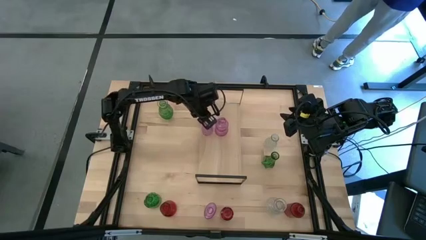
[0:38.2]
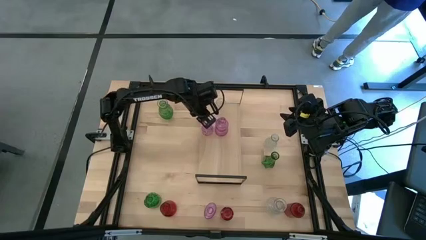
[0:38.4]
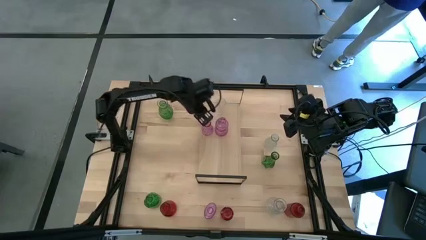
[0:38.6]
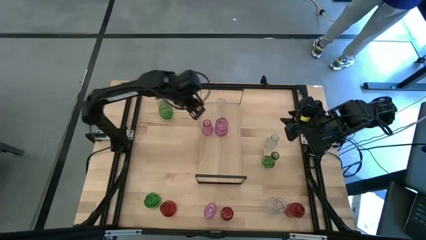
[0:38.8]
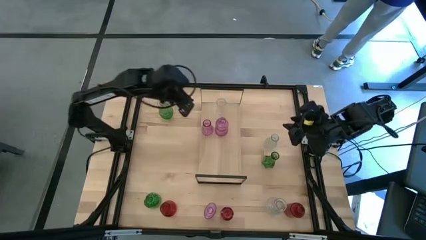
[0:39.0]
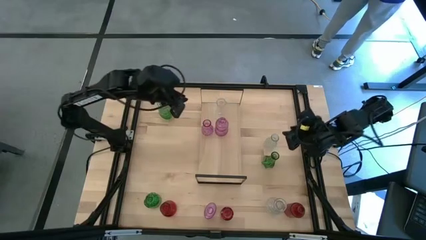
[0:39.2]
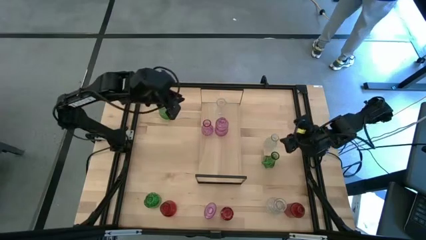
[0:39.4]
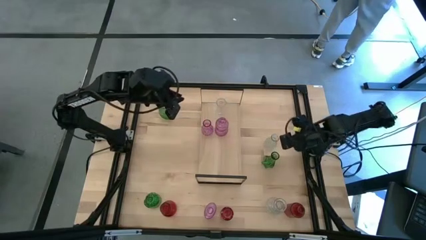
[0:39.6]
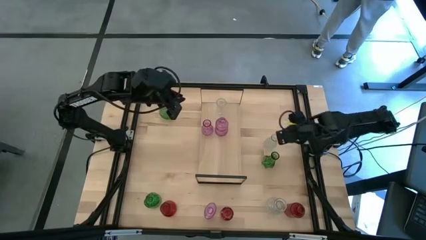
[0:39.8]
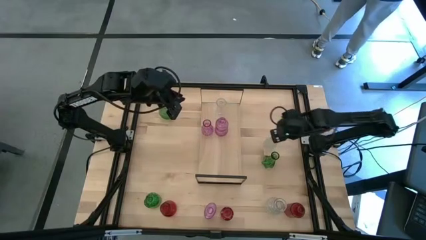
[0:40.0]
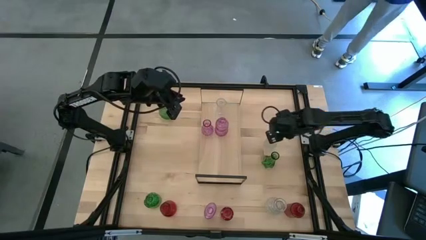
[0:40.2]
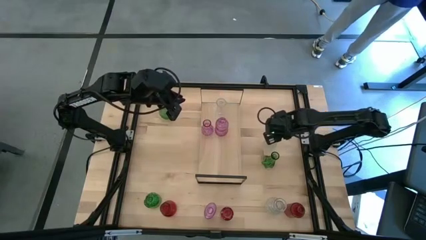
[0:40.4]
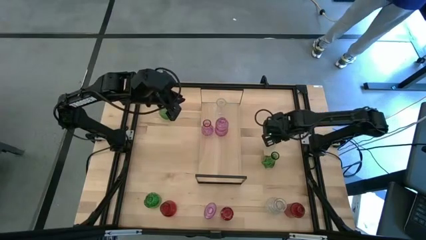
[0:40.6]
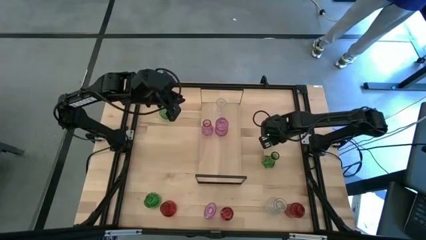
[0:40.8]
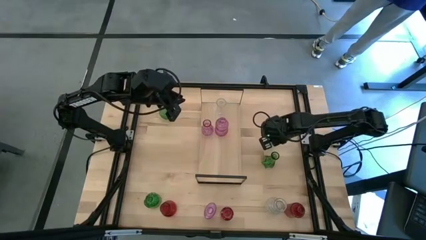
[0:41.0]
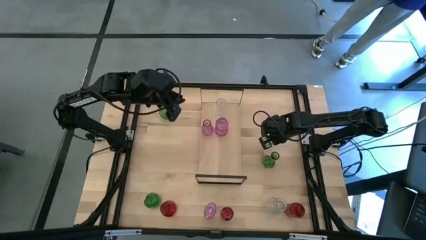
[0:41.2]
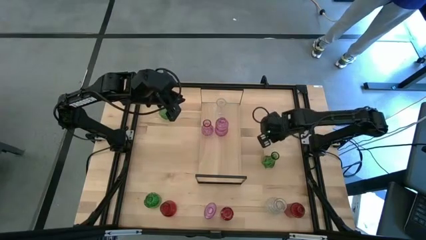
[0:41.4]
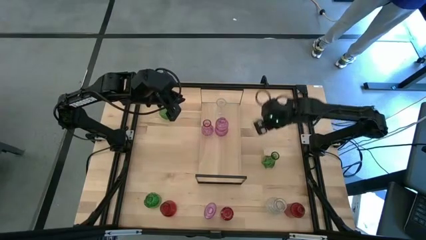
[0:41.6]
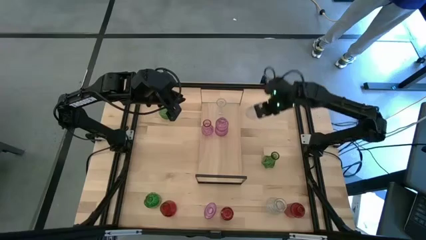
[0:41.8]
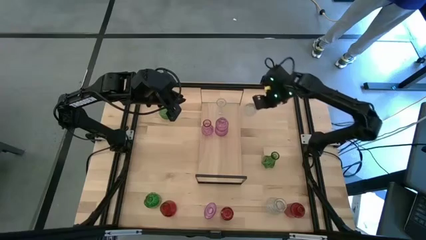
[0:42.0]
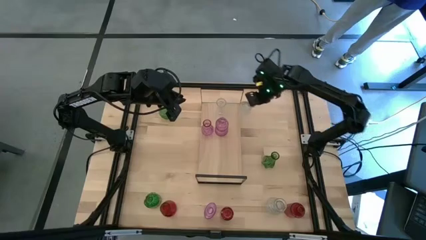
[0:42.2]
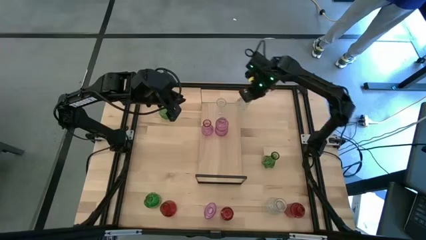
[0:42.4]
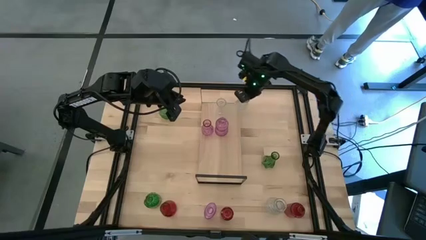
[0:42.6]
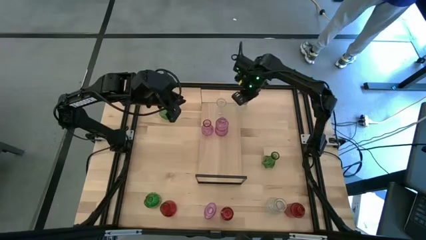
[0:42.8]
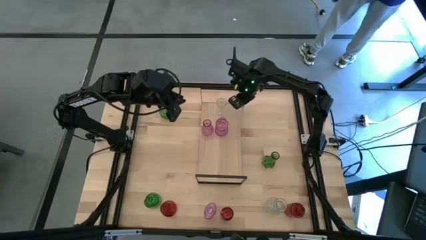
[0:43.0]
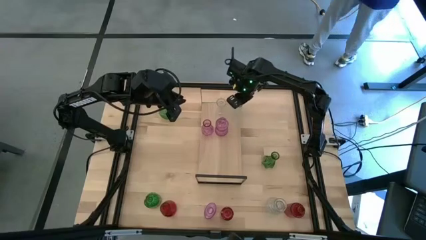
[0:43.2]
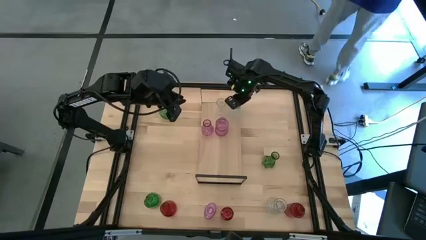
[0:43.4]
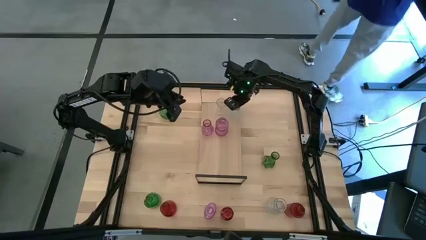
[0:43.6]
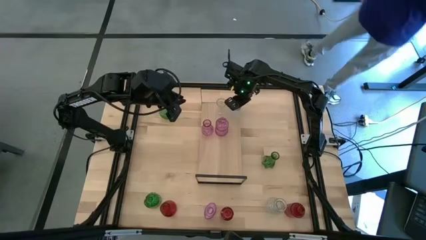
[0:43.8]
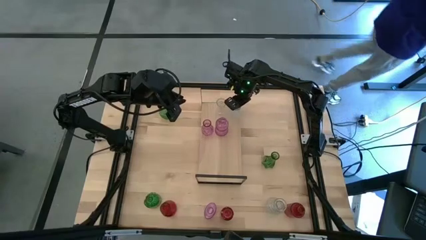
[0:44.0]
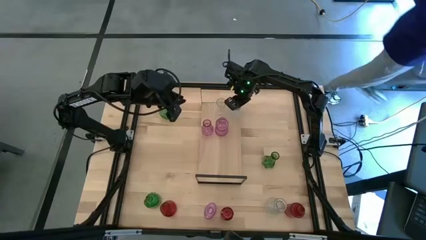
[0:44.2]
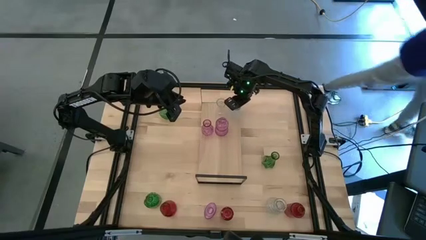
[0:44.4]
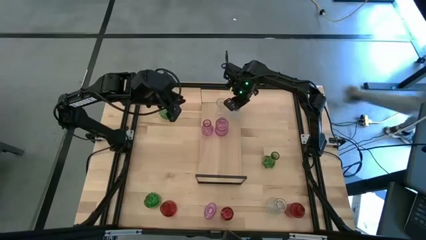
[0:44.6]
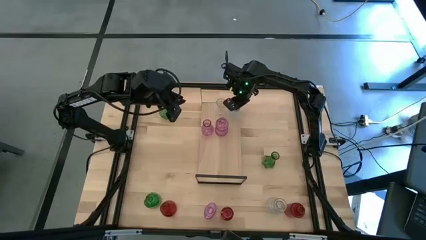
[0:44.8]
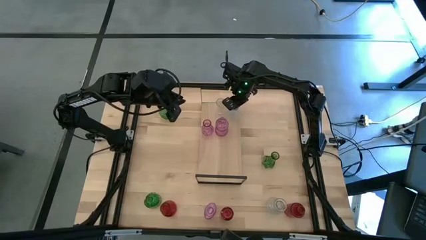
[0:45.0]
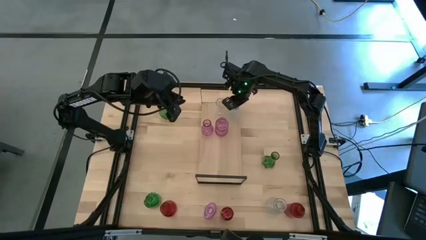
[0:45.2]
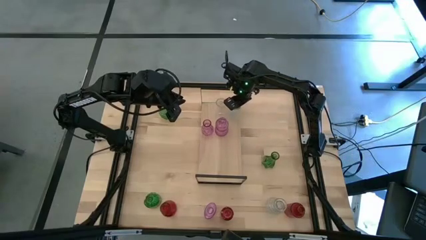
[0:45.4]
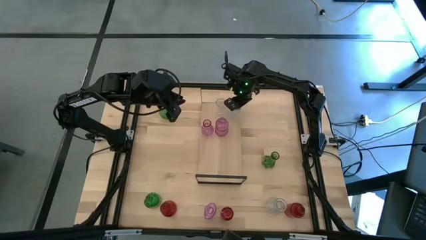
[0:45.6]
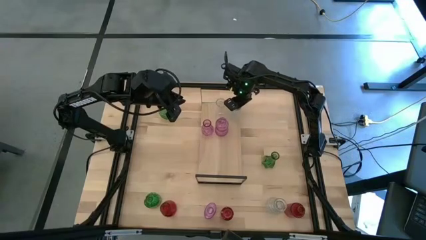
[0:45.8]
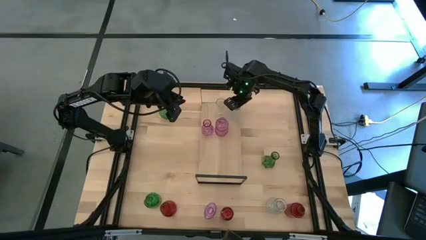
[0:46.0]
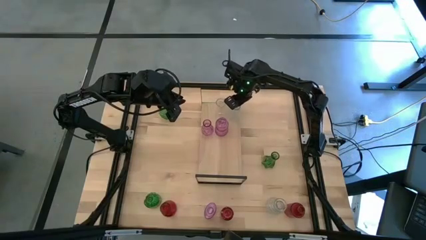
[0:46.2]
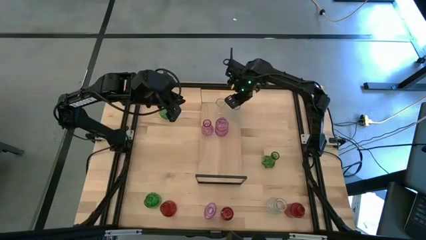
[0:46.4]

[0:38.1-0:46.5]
Task: sort vases onto shelf
Put the top transparent vase on the shelf aligned with the other transparent vase

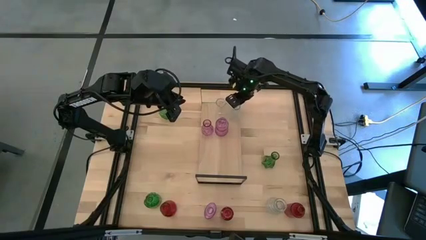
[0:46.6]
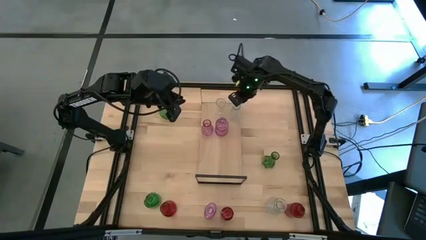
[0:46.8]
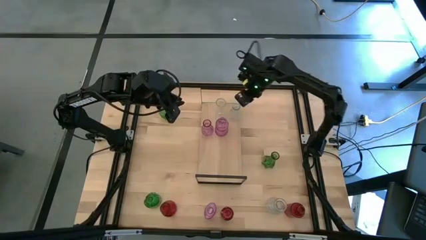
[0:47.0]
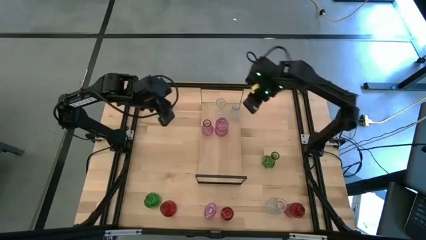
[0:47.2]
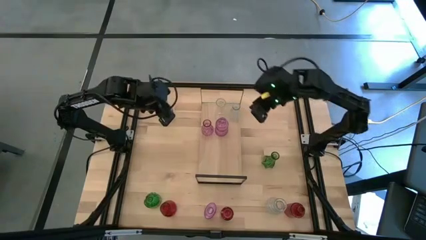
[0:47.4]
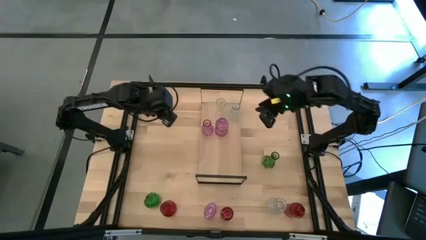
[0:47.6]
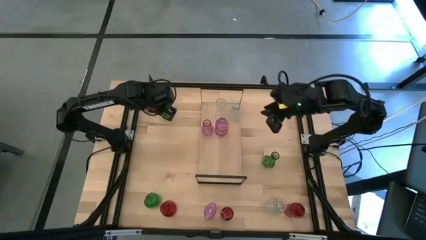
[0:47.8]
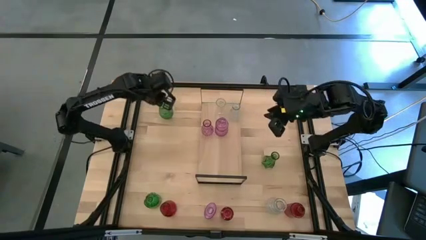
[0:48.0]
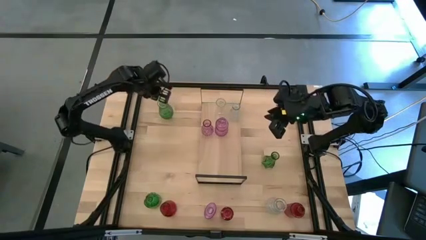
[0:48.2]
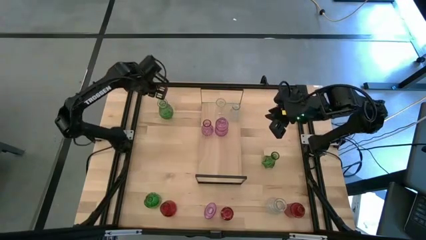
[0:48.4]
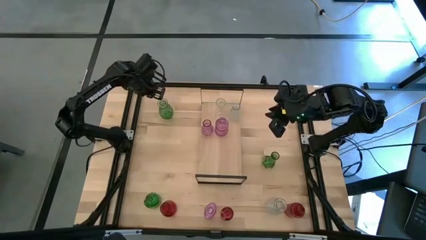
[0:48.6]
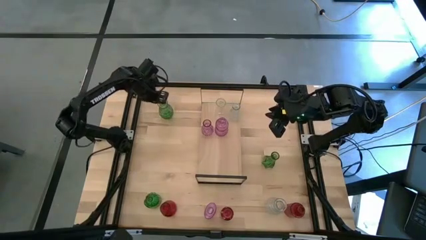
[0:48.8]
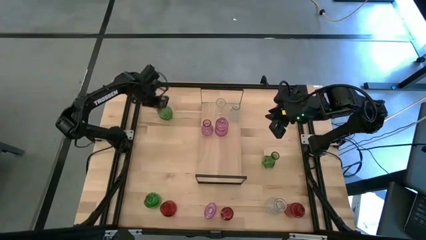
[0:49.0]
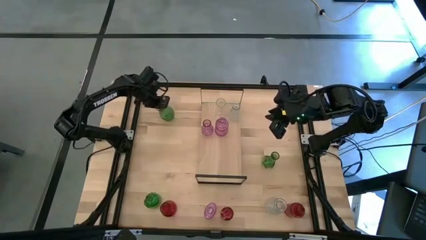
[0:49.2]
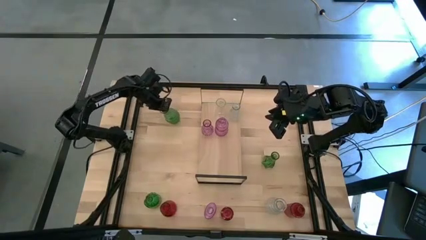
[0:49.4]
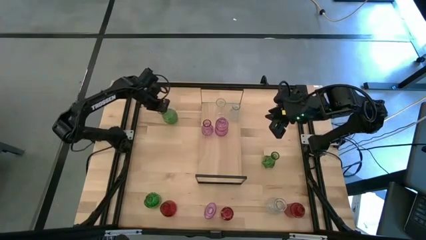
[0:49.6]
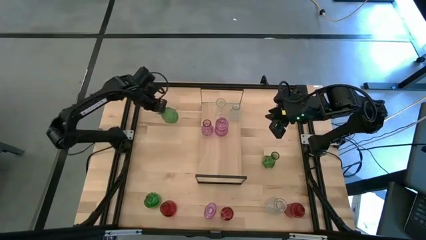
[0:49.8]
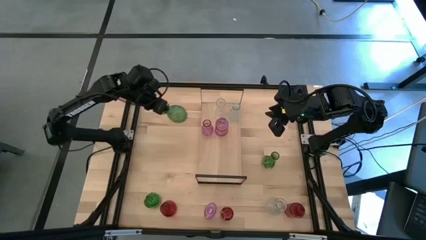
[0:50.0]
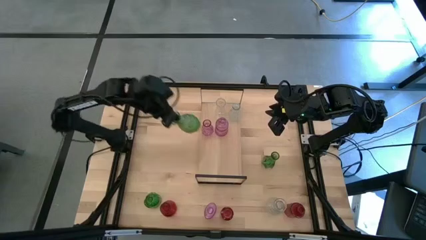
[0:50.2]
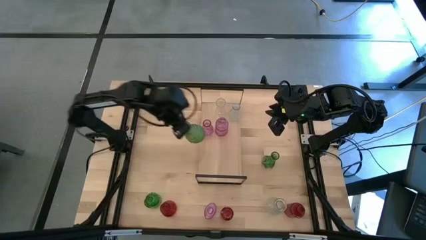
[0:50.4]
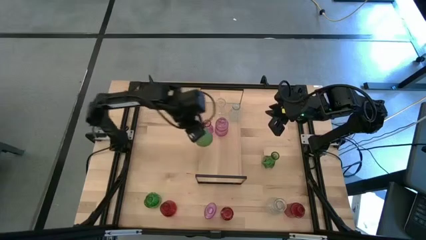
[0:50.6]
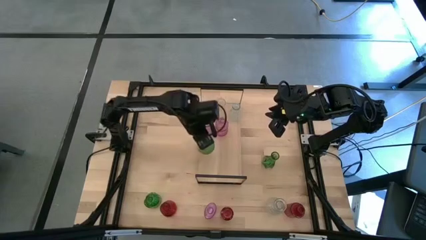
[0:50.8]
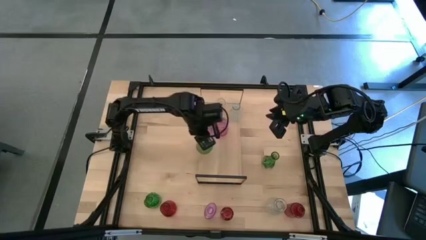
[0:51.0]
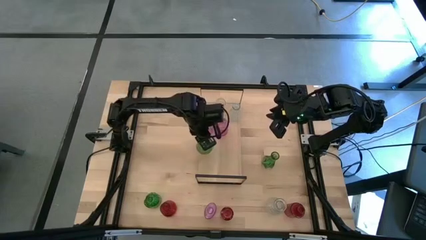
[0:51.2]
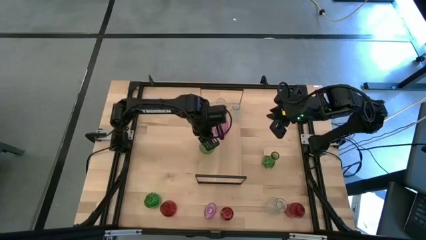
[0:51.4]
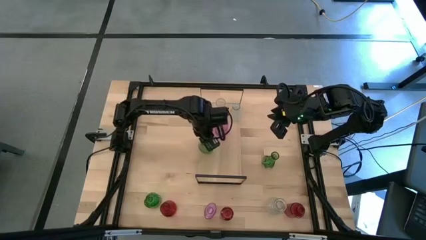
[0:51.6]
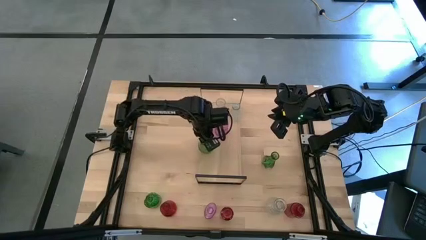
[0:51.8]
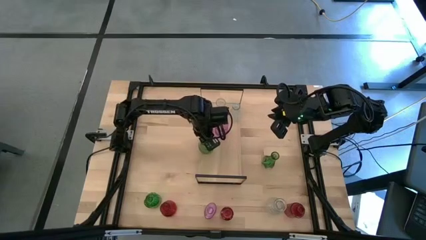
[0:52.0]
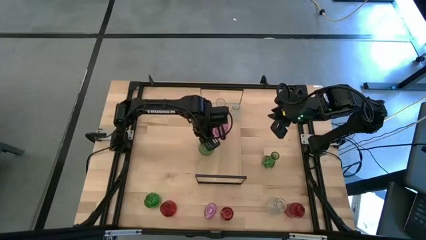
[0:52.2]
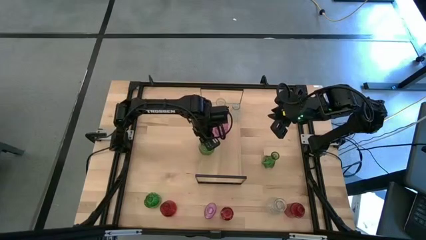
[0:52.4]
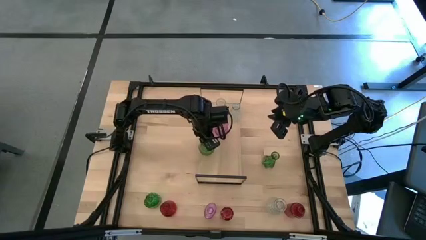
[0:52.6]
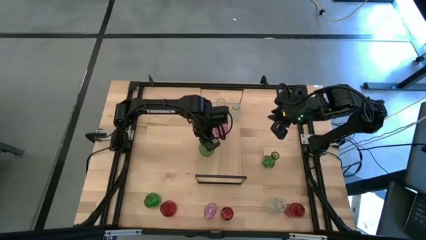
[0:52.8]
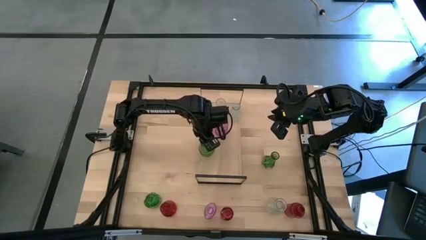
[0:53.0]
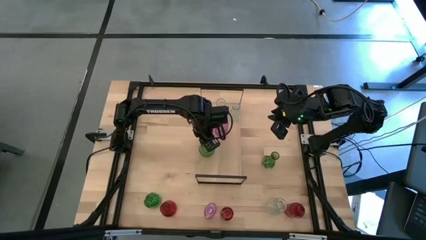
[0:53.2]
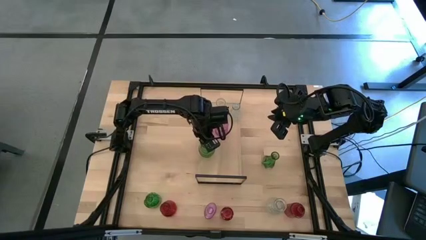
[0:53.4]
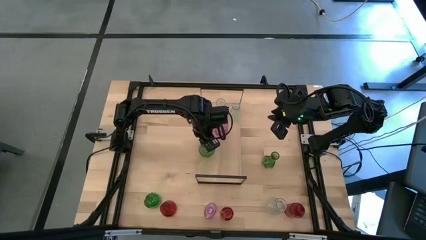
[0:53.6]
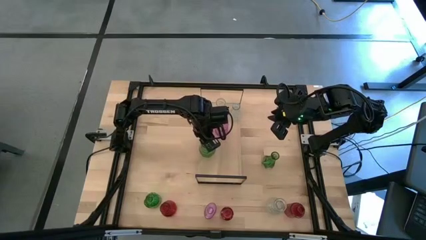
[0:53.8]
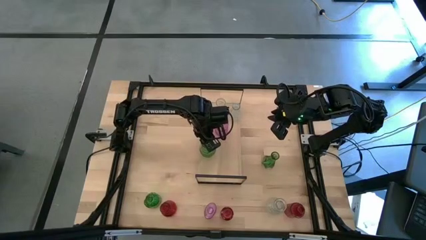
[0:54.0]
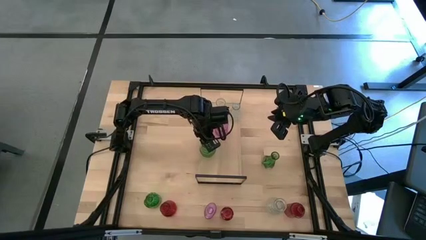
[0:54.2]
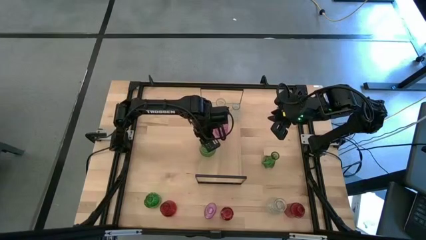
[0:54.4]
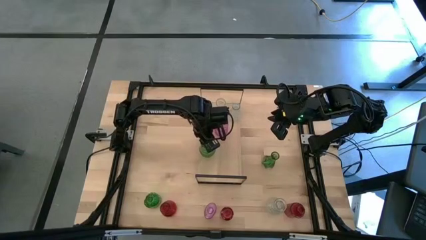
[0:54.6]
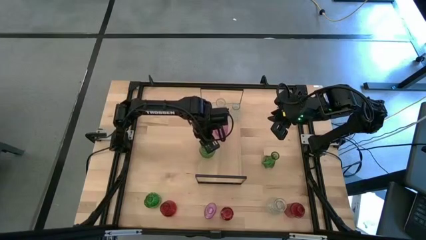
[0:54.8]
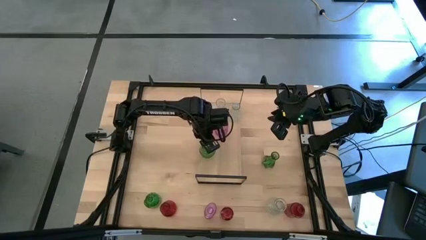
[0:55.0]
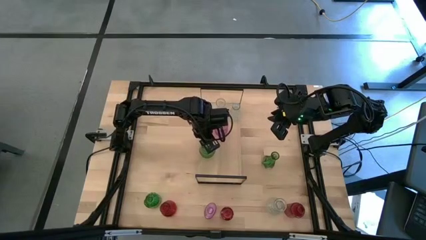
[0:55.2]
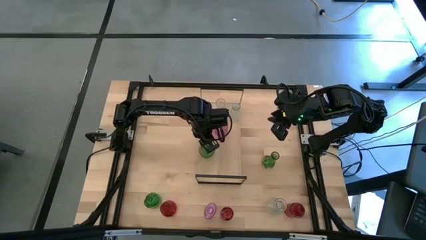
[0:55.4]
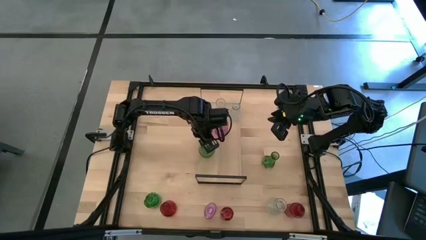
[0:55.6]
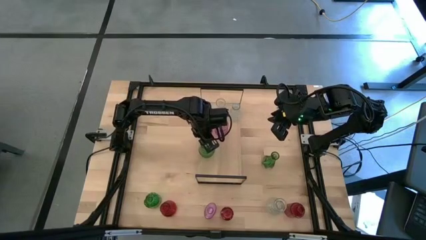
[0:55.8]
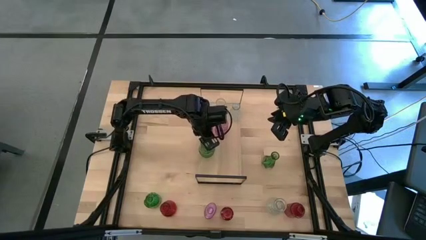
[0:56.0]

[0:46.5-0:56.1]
Put the top green vase on the shelf
